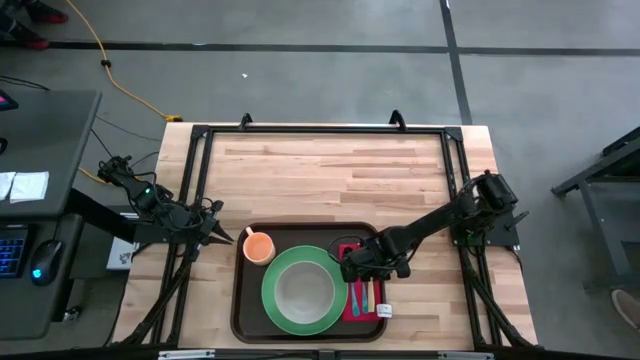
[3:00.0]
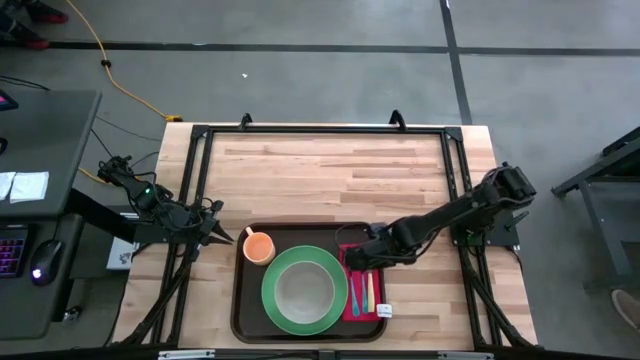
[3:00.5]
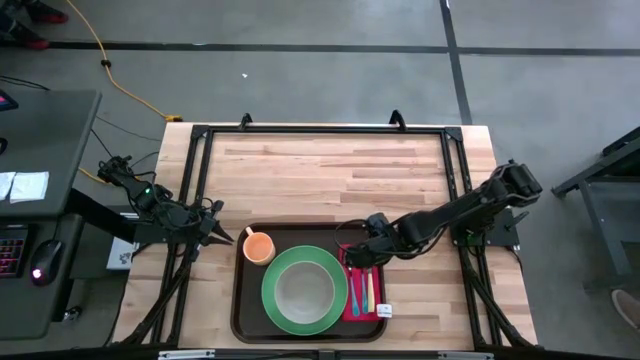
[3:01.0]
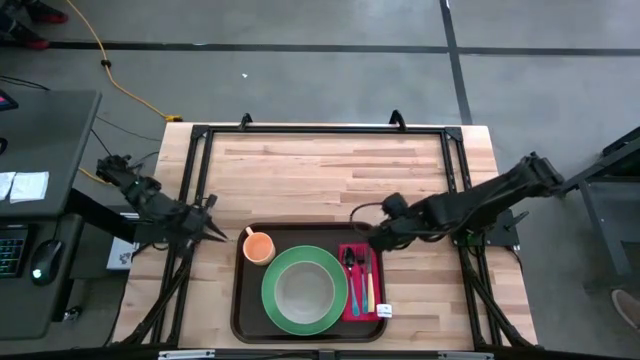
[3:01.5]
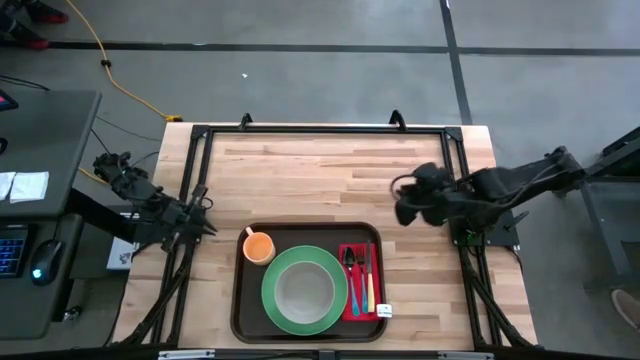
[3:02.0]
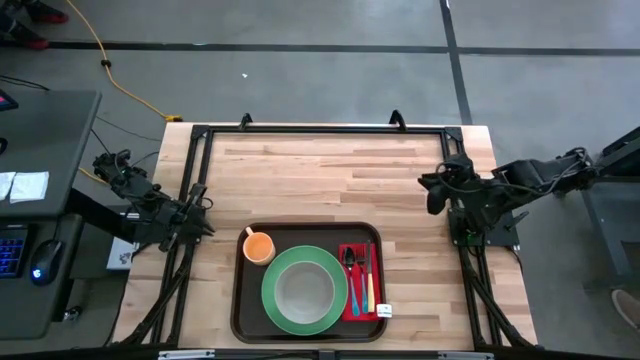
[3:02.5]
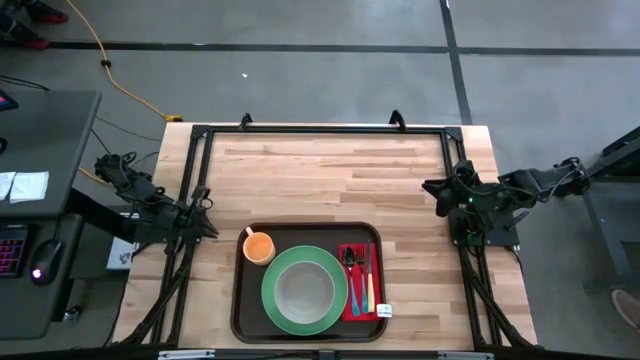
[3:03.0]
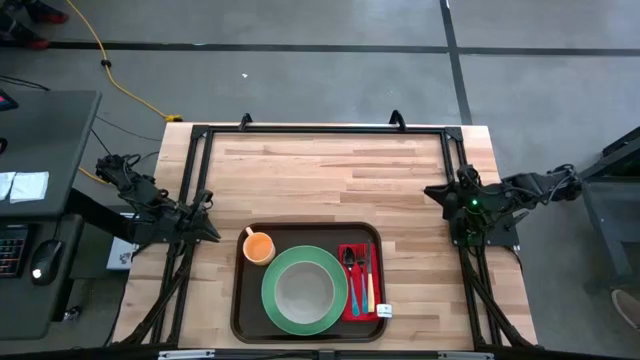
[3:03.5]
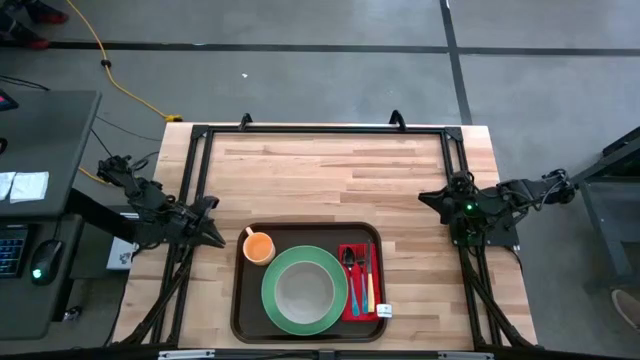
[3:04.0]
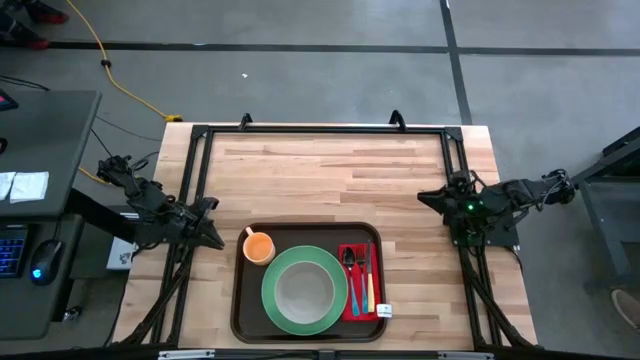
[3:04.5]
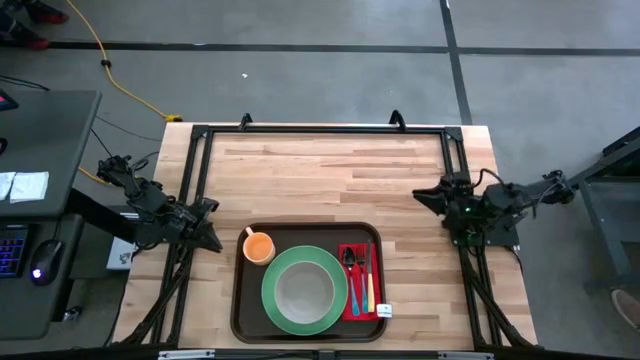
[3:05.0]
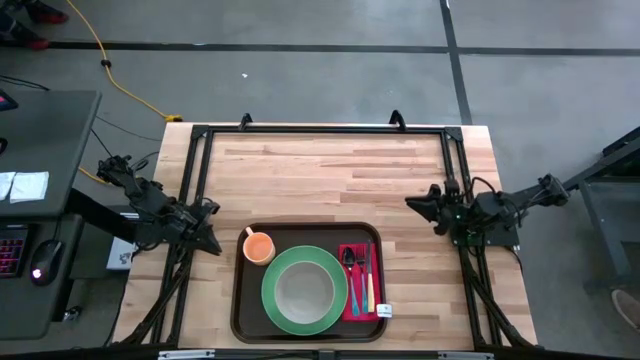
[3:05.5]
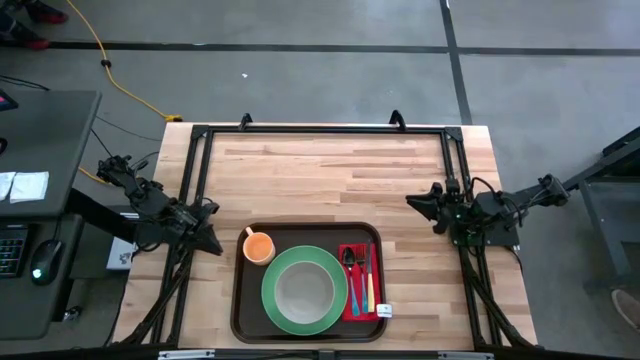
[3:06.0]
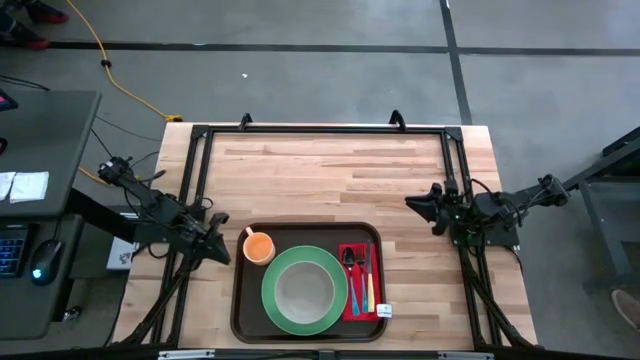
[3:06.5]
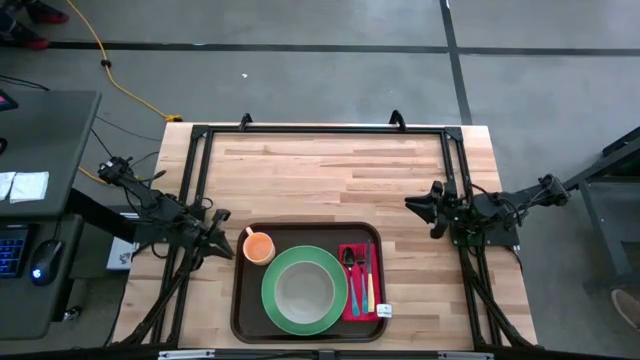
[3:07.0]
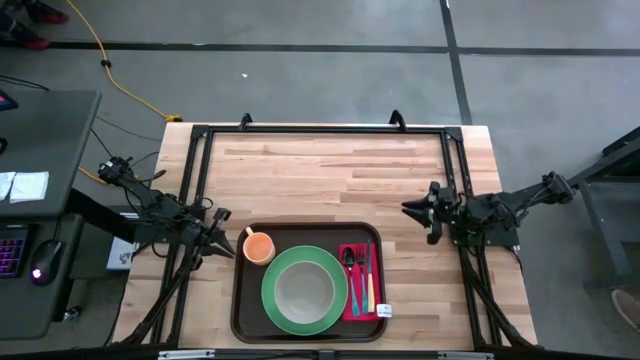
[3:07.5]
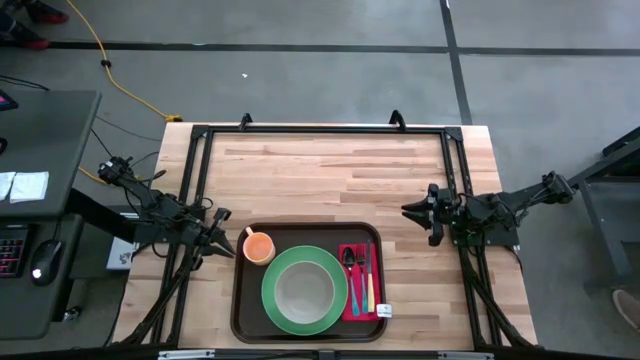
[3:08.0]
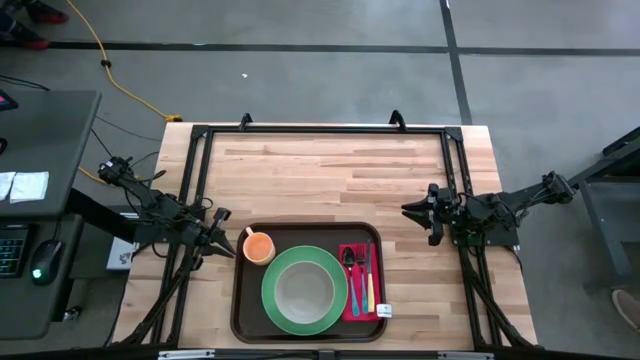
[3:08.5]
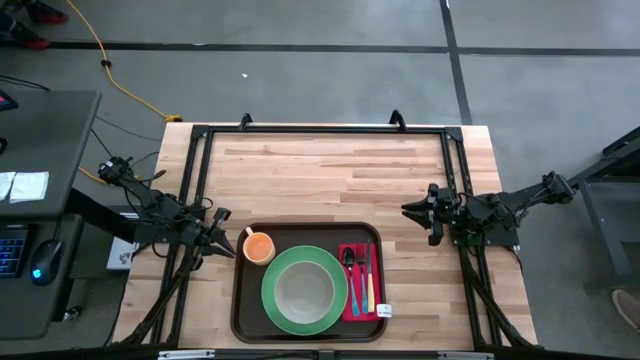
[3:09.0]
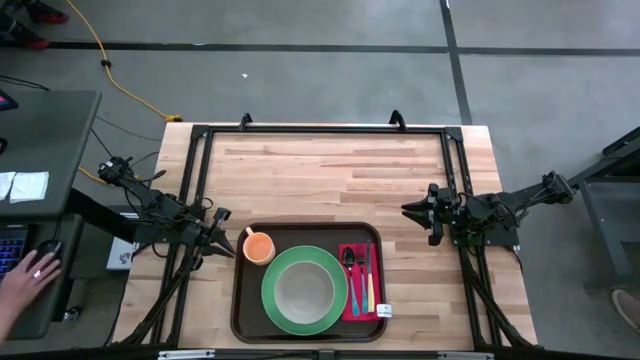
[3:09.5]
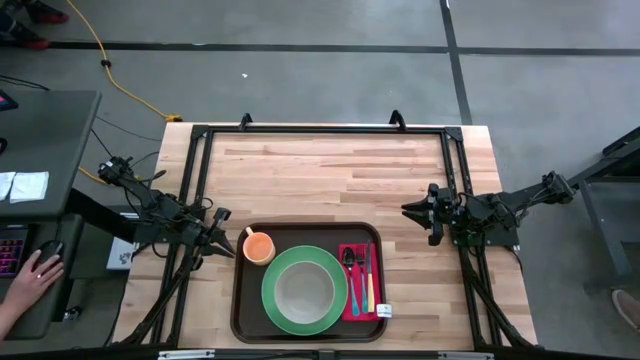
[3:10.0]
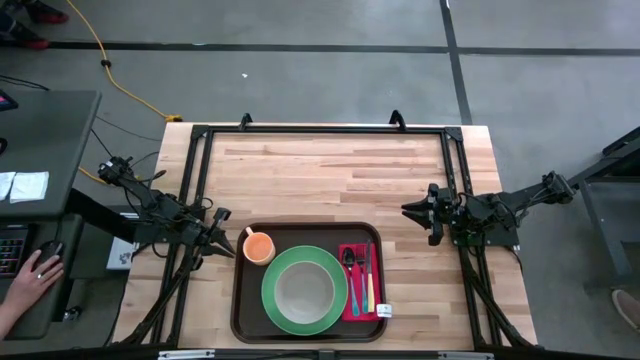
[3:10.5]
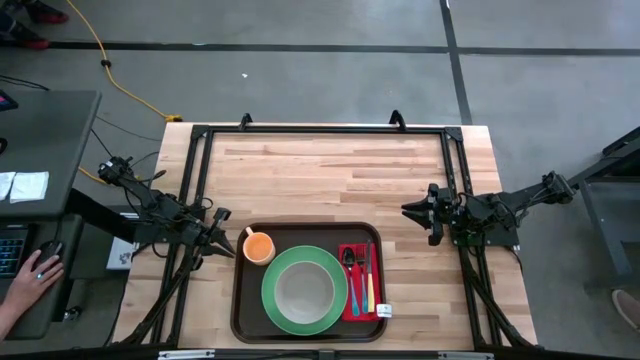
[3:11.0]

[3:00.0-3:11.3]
Task: Set up tray
Return to Home Position

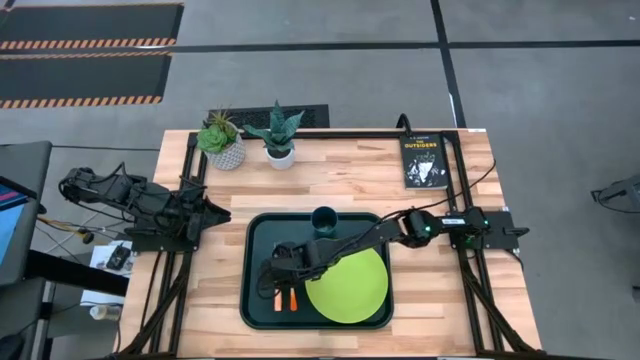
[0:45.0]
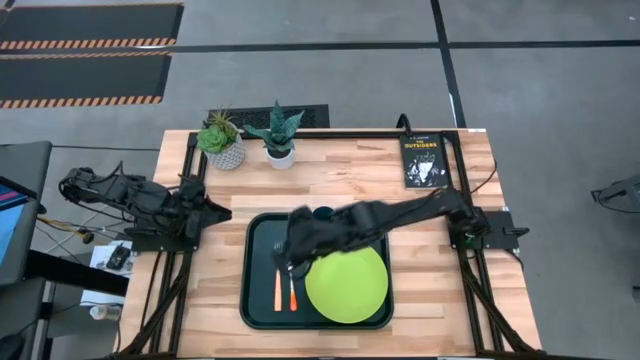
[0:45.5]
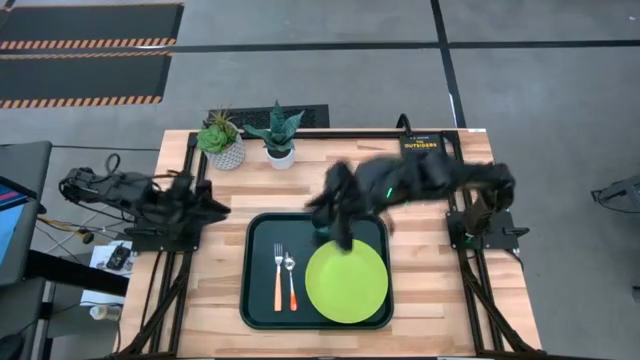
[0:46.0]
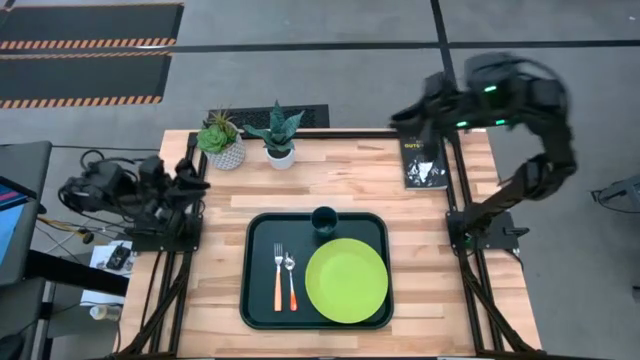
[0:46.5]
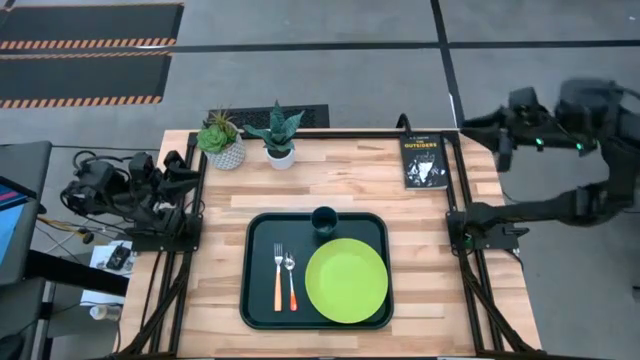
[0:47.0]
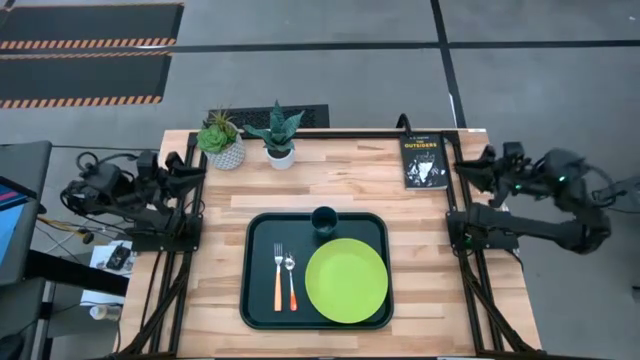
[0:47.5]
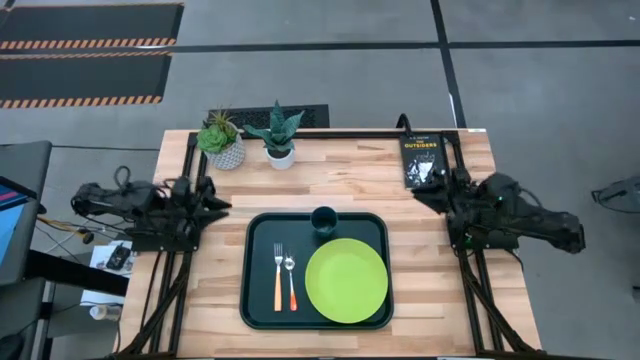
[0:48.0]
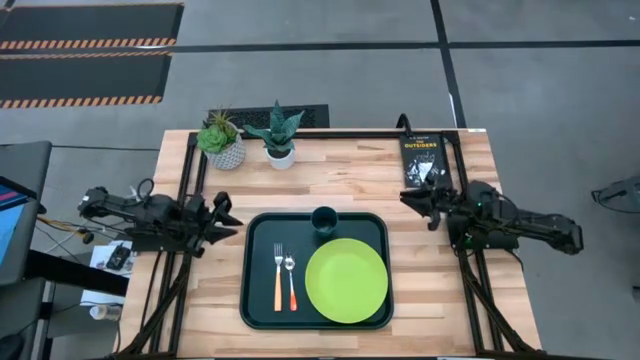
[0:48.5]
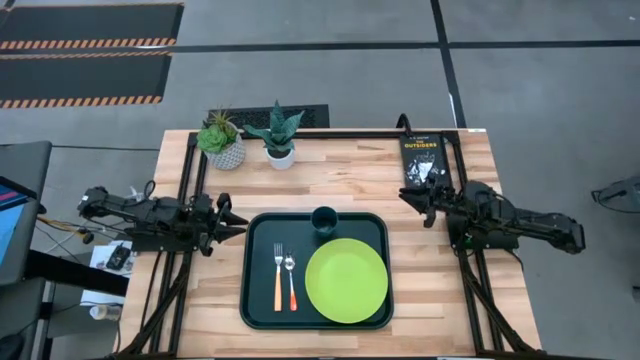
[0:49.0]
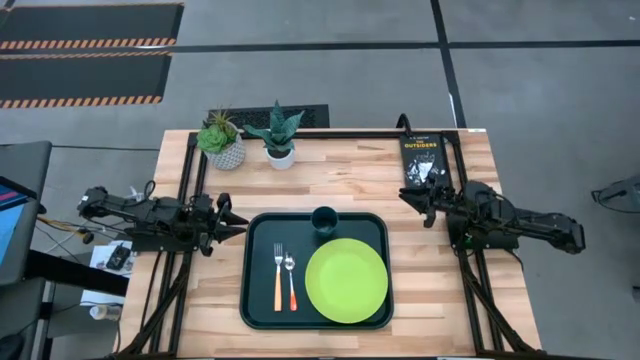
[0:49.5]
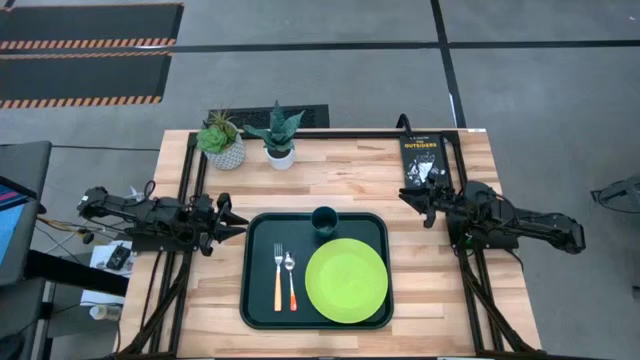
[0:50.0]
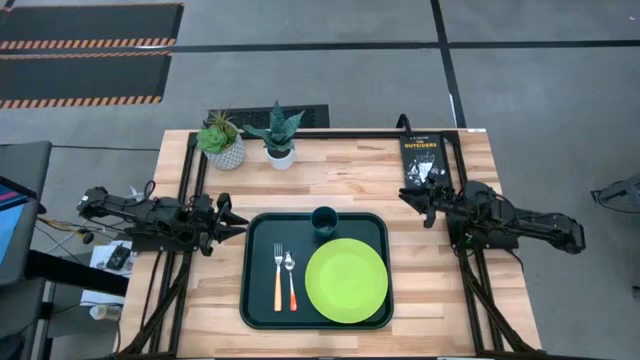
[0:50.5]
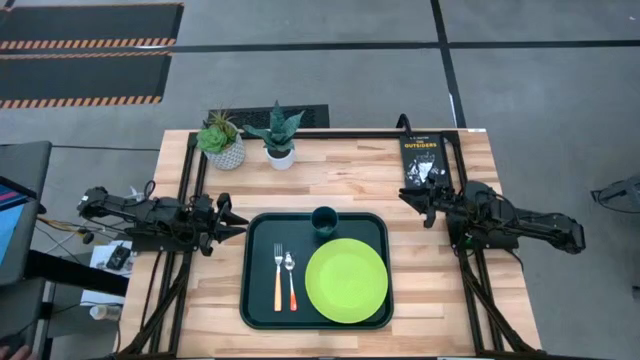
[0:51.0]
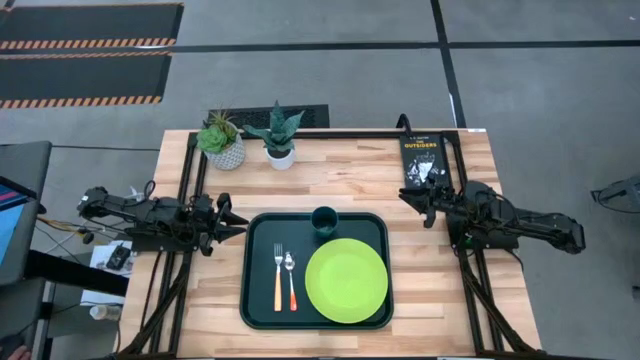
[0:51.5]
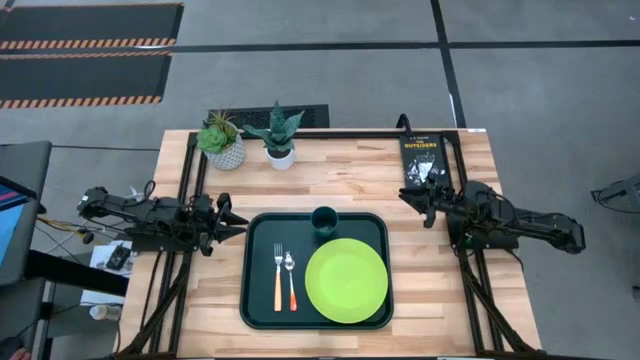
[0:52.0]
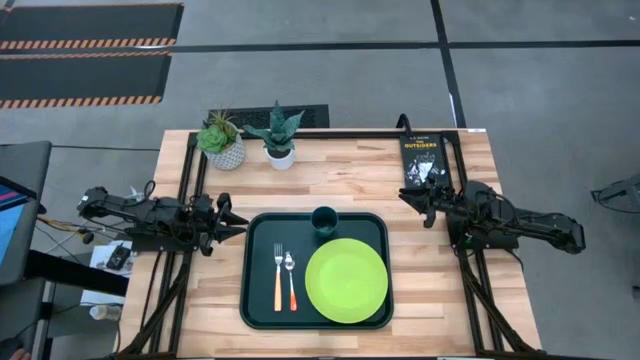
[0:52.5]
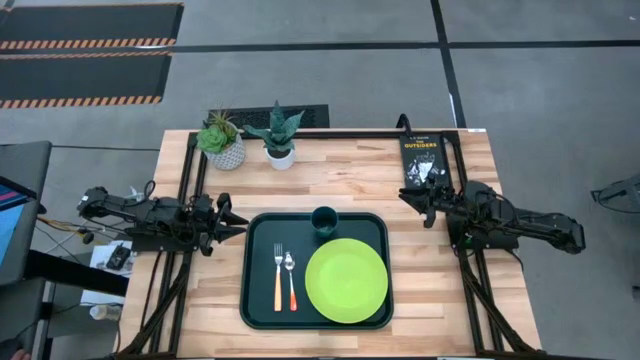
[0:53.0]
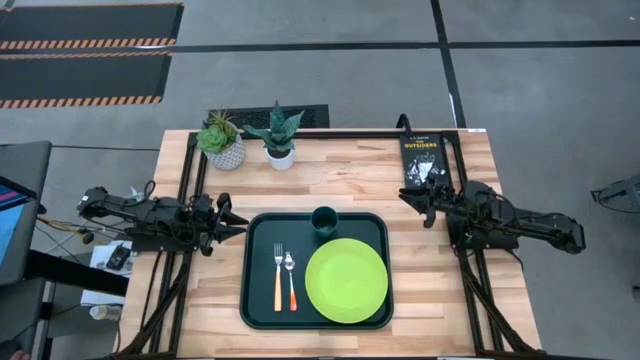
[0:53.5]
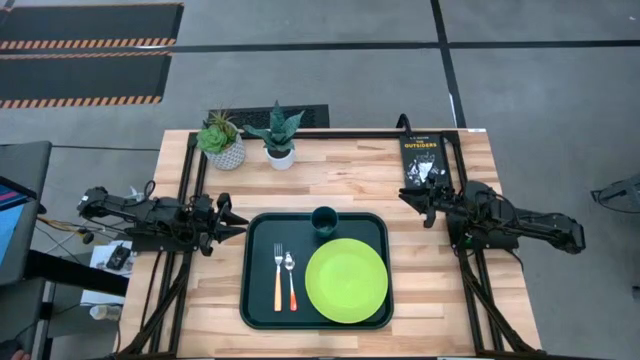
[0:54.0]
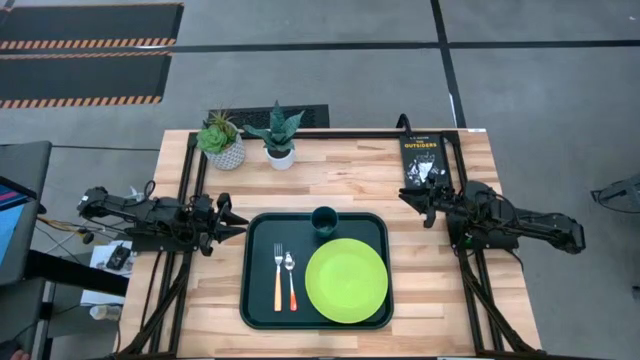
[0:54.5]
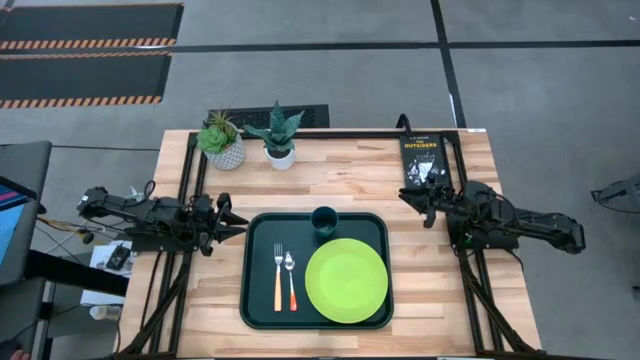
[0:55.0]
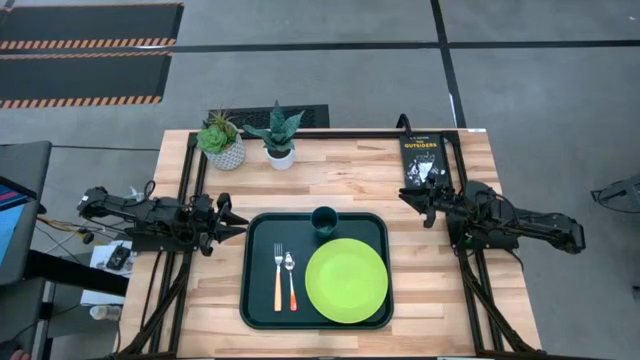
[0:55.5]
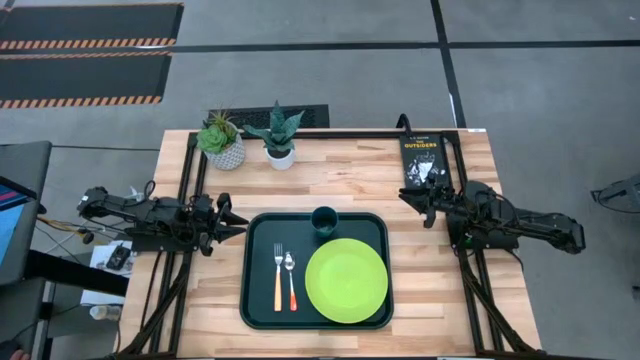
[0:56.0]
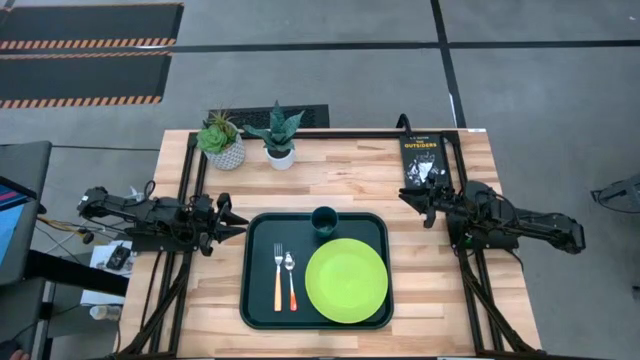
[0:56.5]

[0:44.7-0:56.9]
Task: Pick and place plate/cup/fork/spoon on tray
Return to Home Position
